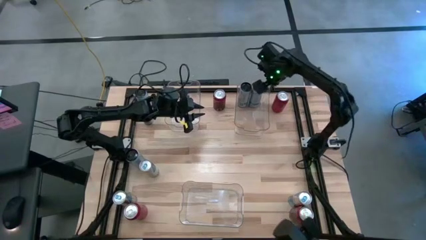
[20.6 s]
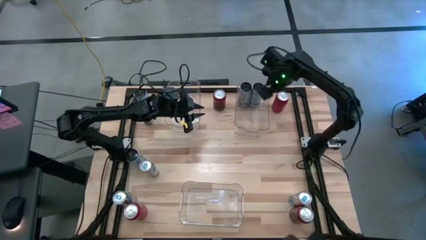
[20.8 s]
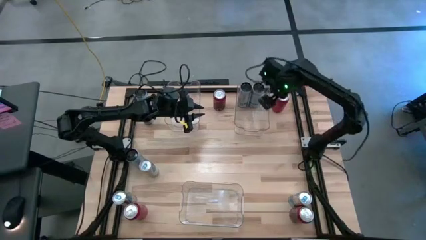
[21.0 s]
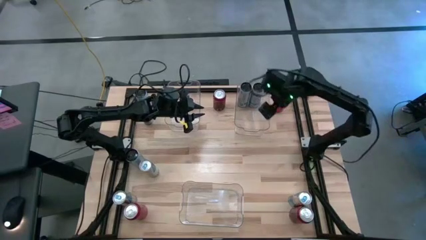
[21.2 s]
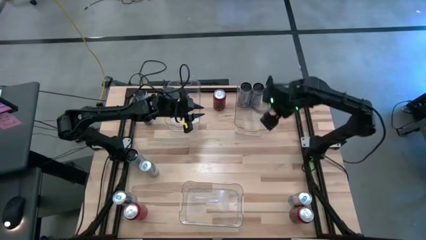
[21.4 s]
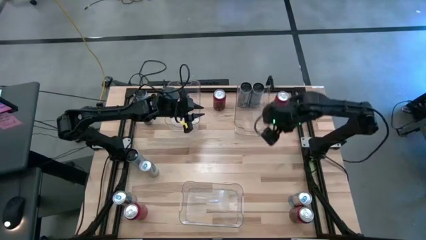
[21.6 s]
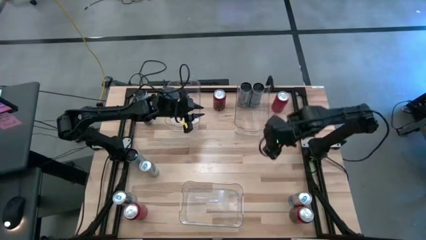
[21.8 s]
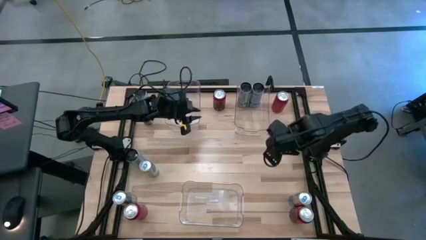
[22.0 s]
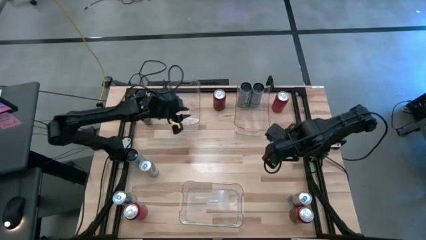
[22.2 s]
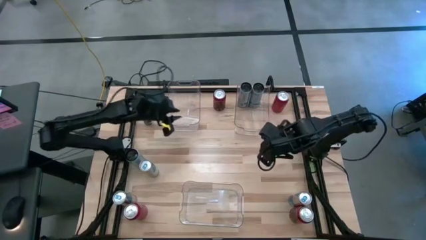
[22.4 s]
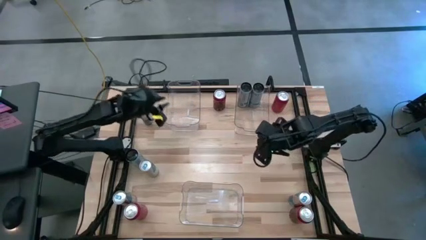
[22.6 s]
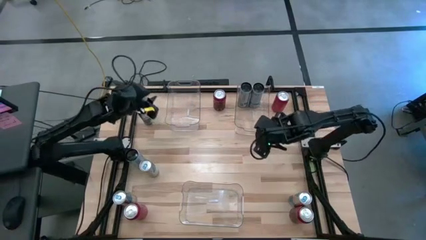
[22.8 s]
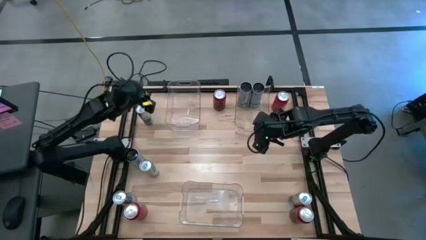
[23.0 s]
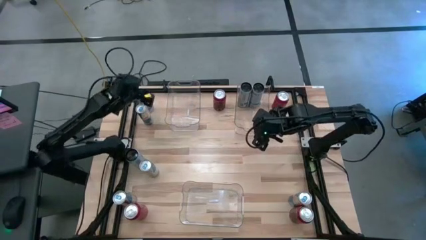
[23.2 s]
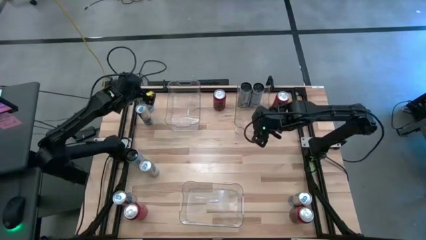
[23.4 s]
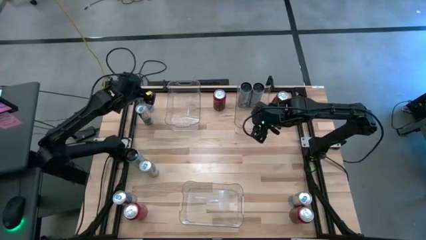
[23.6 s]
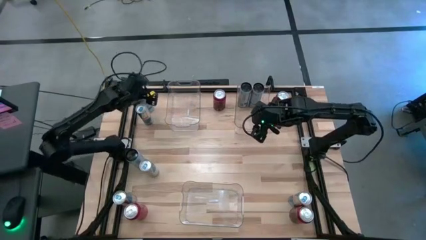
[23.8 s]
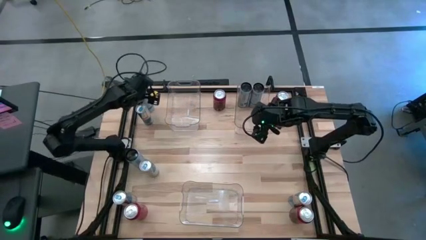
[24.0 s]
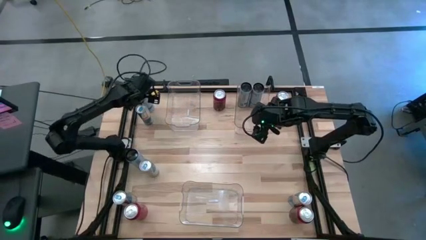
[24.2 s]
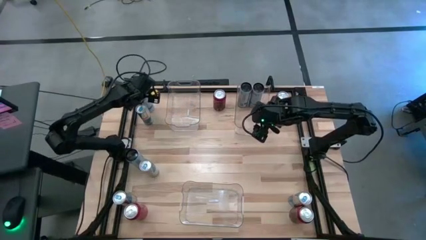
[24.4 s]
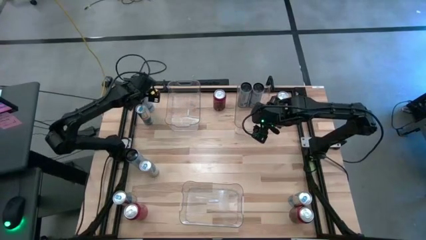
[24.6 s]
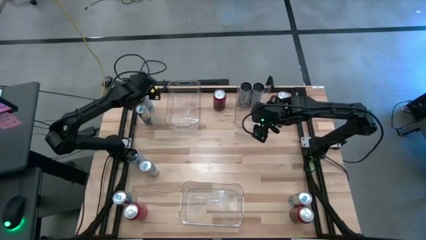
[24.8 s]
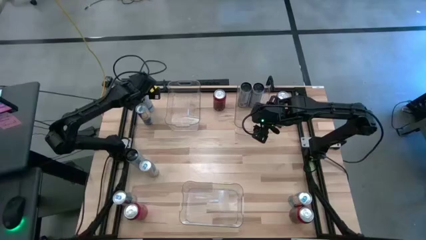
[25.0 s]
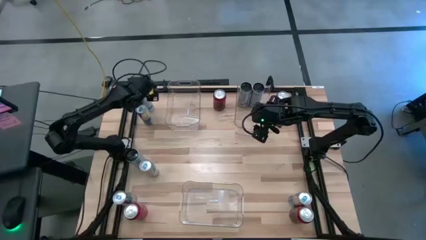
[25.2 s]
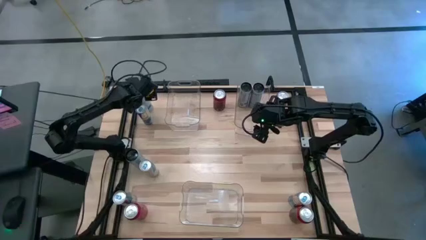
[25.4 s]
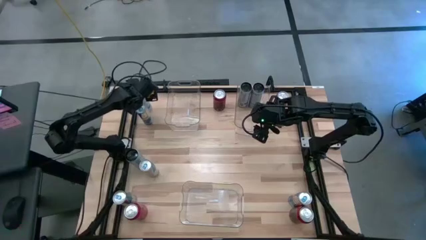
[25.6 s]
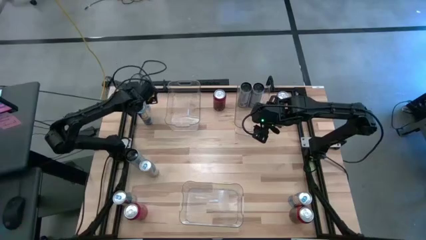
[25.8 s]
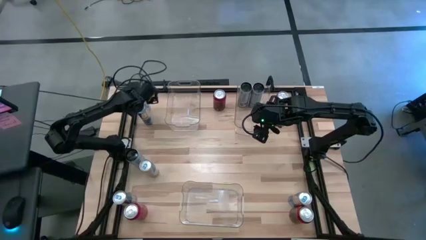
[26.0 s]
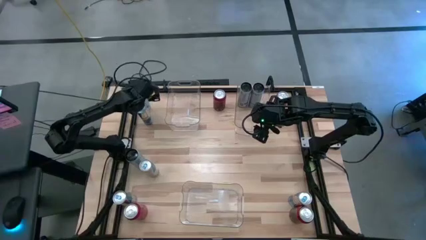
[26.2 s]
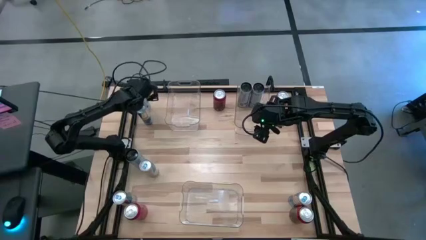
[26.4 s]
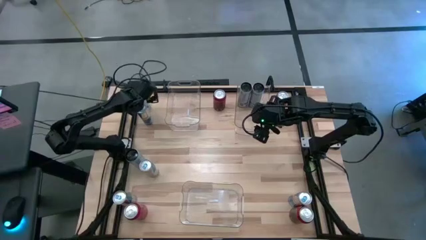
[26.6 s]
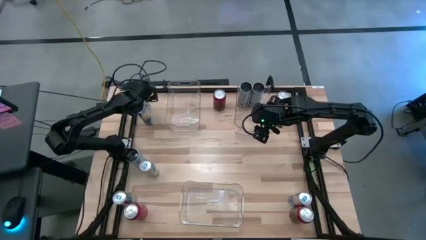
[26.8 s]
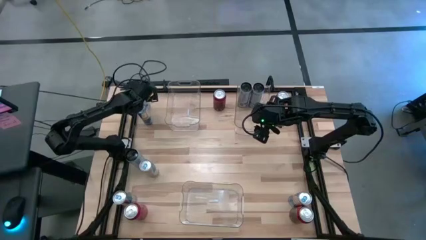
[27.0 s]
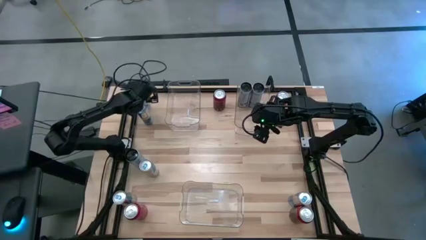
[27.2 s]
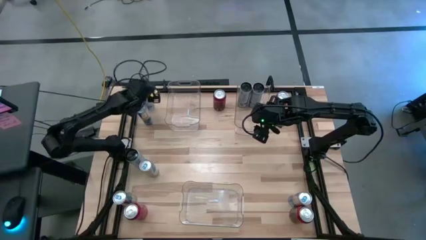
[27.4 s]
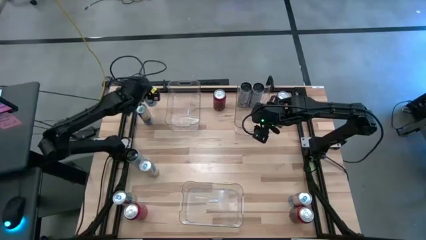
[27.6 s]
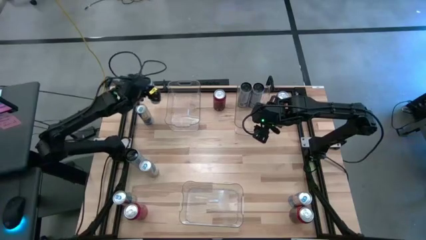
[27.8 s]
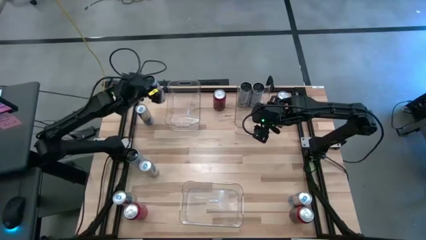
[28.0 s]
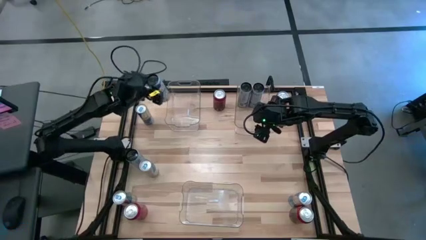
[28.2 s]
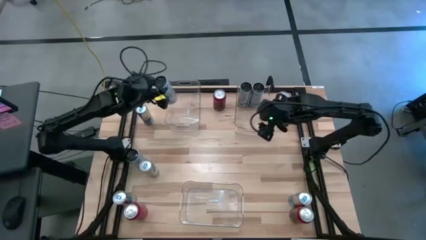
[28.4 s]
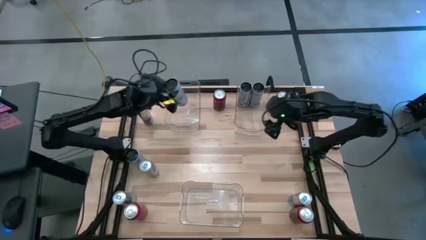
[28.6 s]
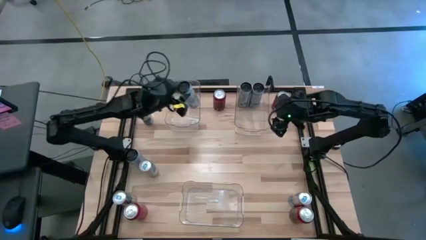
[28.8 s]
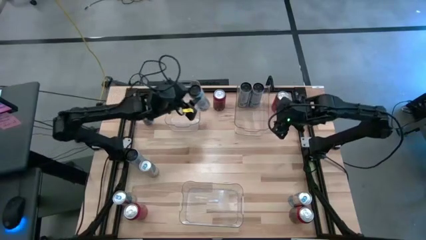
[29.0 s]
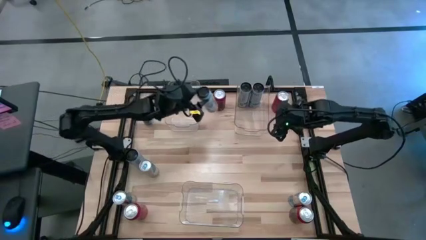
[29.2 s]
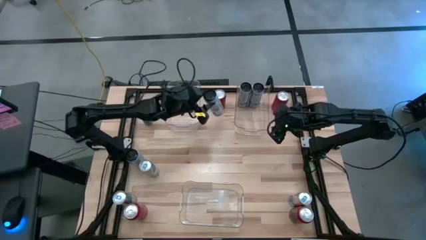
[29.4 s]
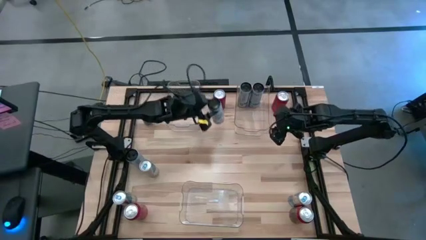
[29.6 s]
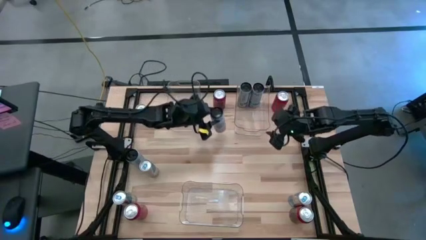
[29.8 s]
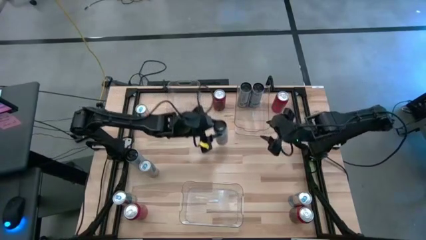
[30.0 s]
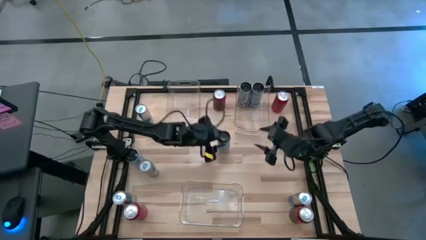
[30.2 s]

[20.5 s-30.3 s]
Task: Sort soda cans
Put the top white-blue soda can into the top right transparent bin

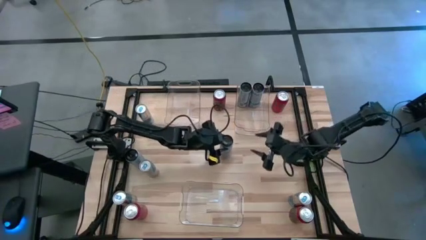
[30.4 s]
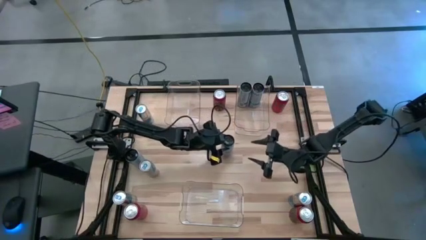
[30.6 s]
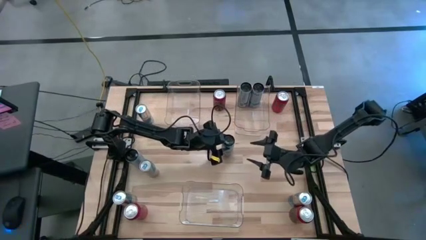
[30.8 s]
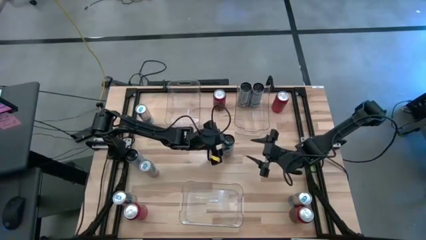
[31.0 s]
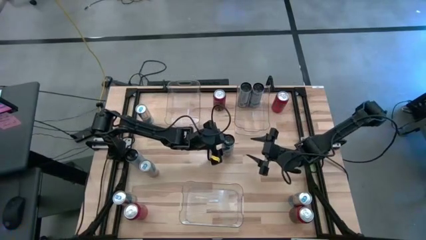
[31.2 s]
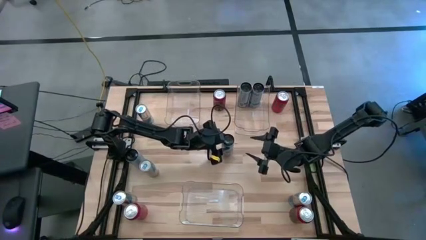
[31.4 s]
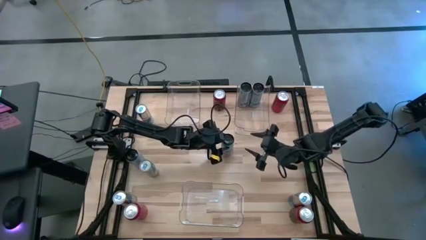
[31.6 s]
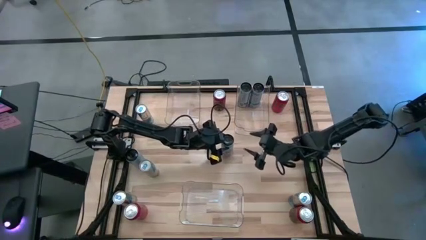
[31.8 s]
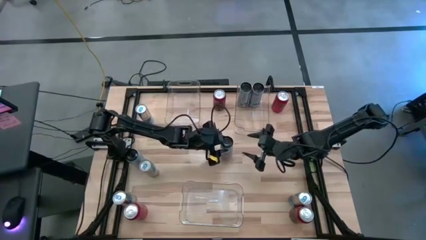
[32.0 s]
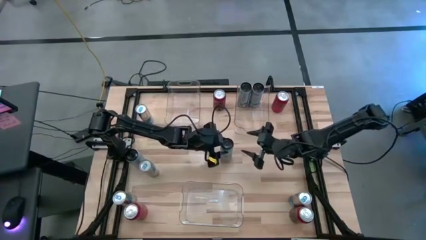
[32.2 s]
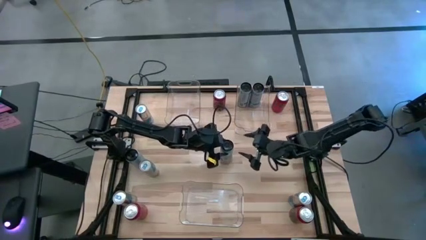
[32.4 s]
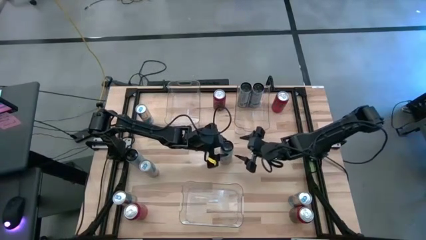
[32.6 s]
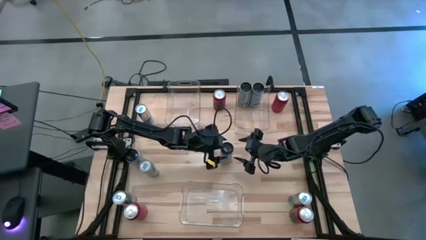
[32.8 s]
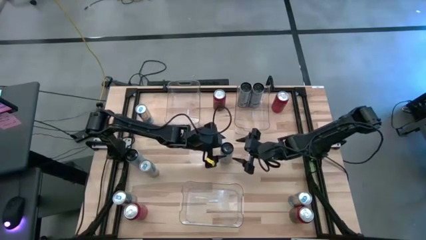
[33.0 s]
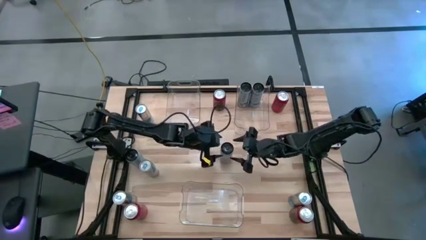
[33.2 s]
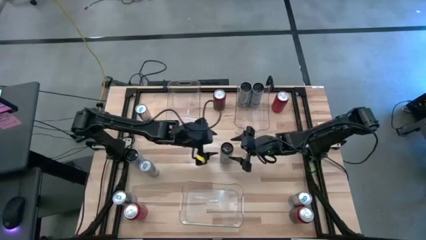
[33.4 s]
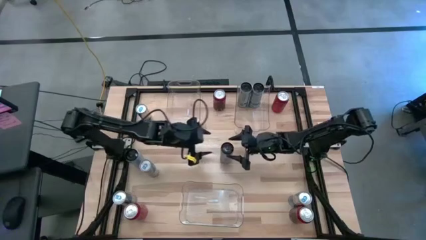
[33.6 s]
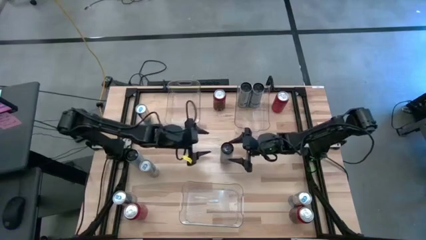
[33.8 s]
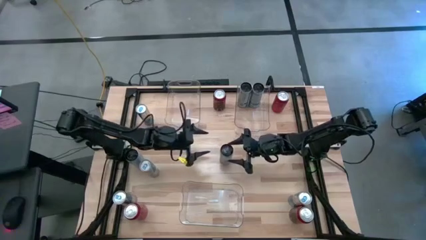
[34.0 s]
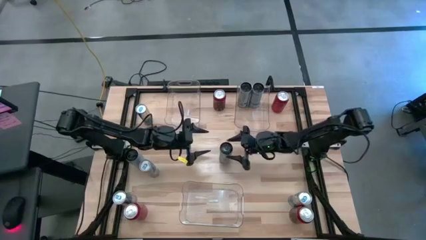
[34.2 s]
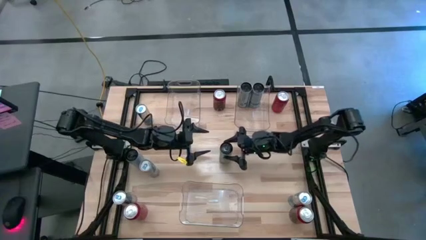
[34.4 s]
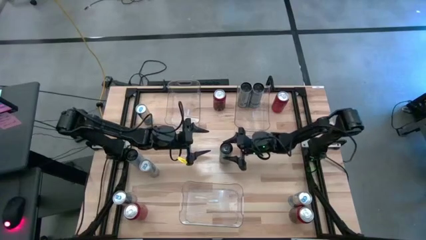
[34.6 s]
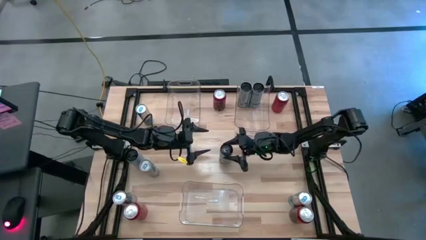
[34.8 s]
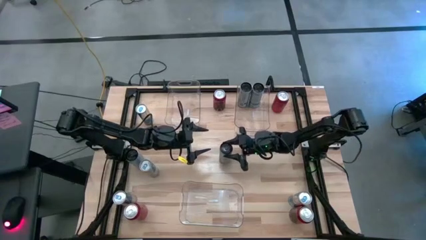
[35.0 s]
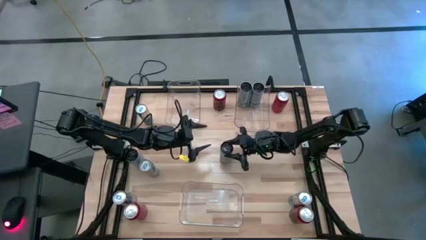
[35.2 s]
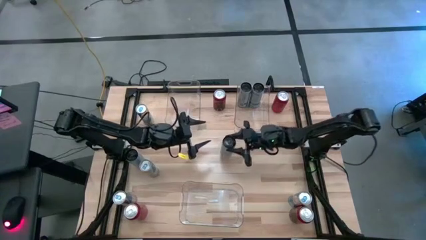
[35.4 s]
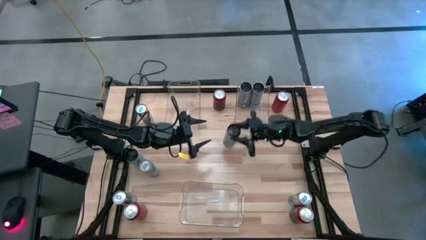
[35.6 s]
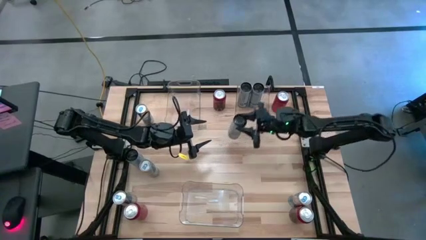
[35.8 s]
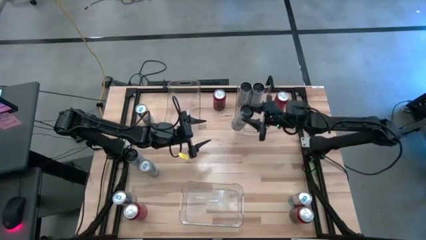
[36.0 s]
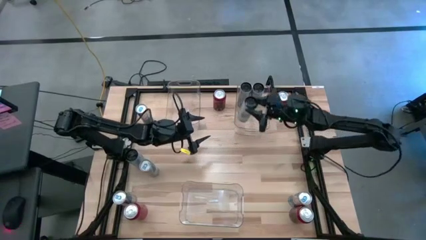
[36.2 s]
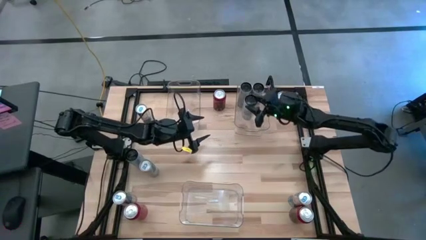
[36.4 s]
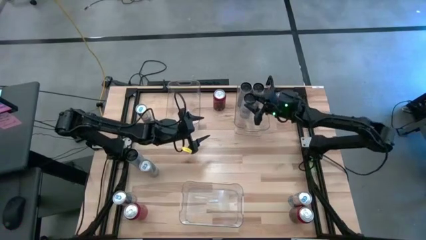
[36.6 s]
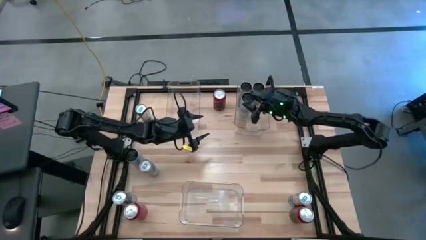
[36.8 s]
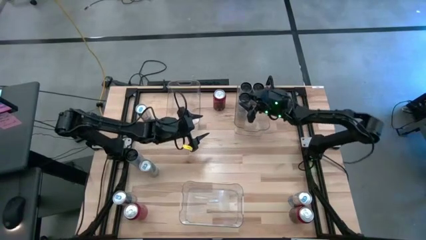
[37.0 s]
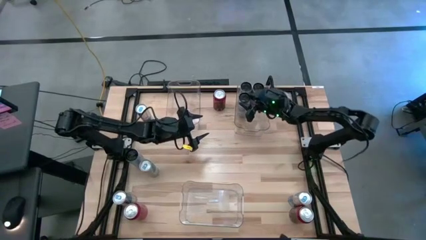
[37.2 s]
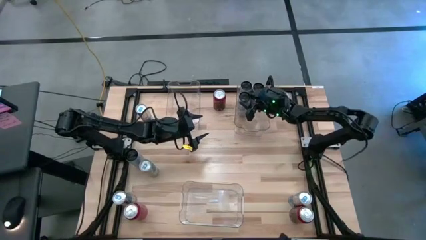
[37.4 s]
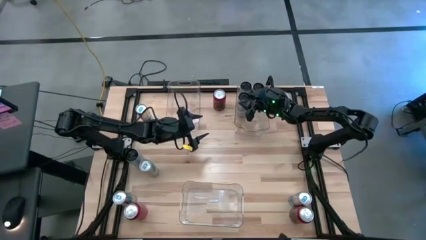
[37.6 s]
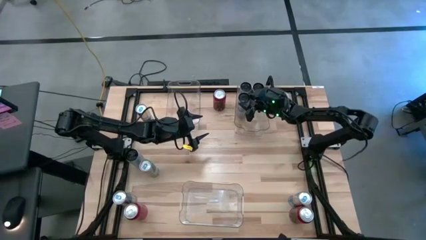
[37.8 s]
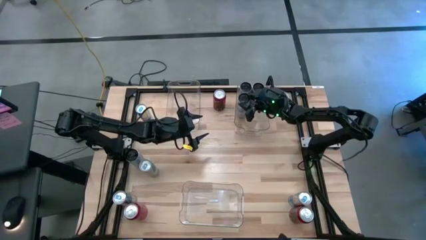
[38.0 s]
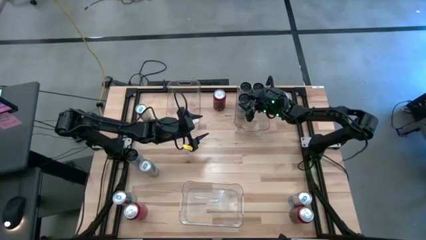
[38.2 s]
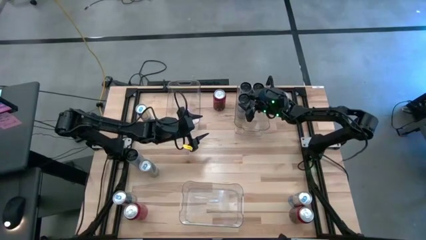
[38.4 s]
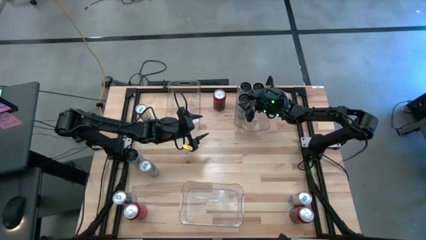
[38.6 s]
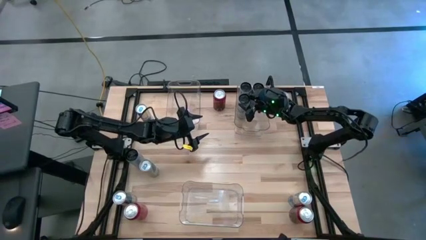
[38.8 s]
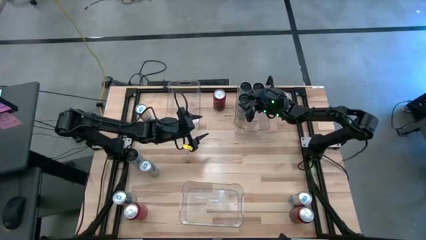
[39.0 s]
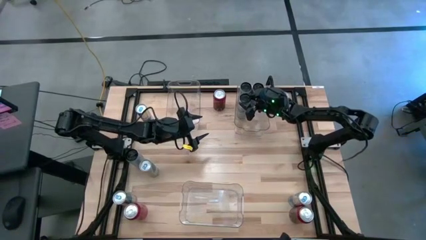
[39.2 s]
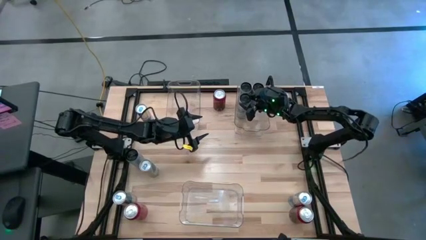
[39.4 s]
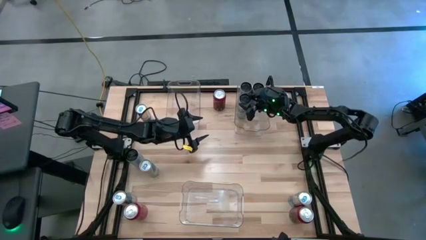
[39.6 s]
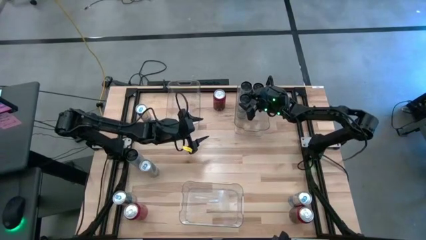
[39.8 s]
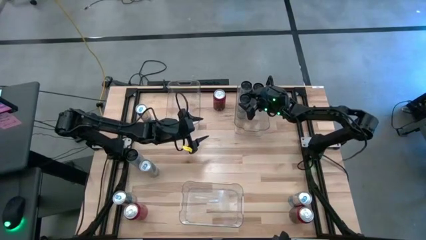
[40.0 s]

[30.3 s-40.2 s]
Put the top white-blue soda can into the top right transparent bin
